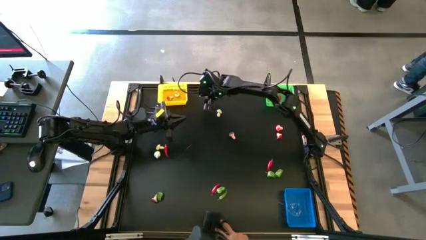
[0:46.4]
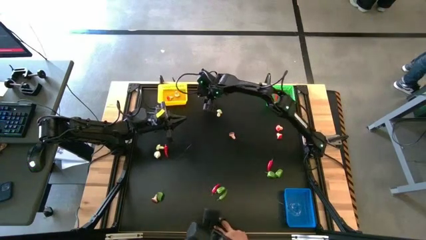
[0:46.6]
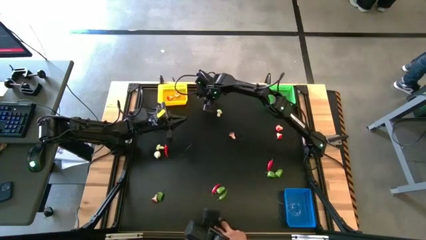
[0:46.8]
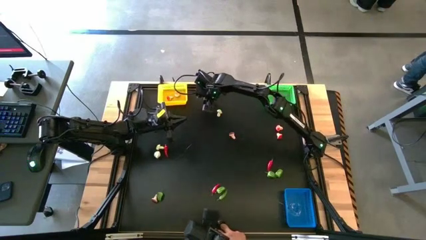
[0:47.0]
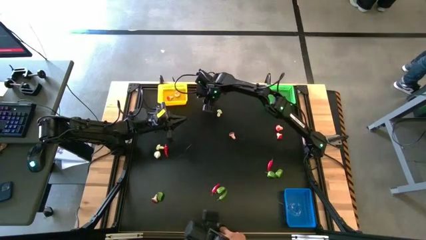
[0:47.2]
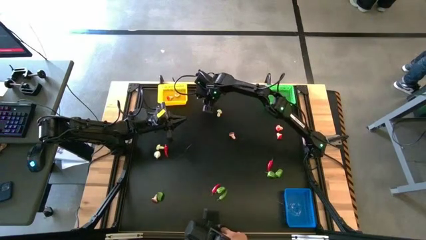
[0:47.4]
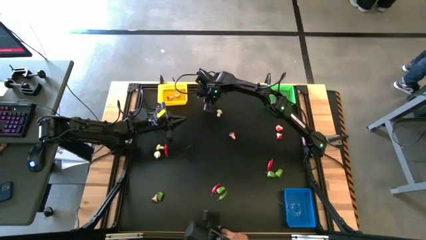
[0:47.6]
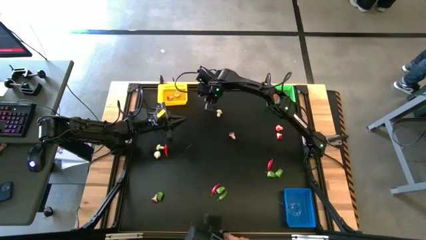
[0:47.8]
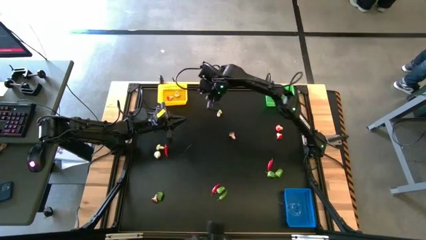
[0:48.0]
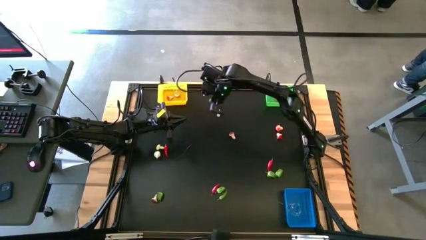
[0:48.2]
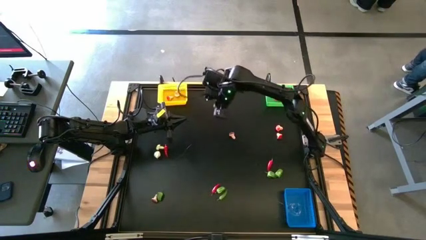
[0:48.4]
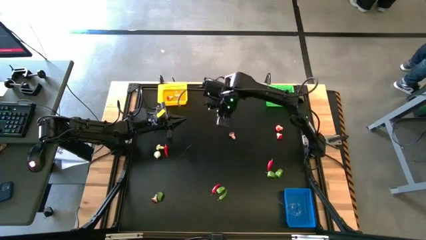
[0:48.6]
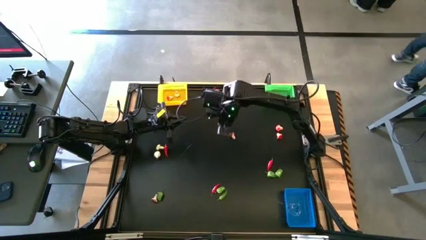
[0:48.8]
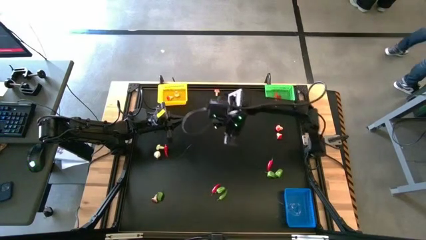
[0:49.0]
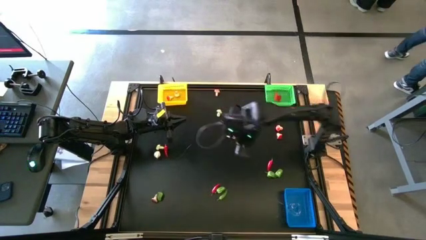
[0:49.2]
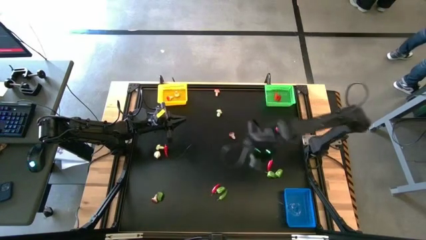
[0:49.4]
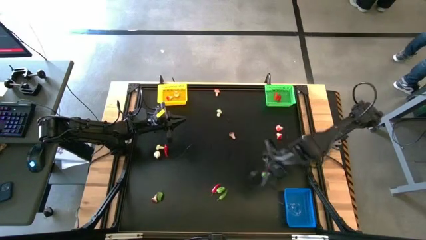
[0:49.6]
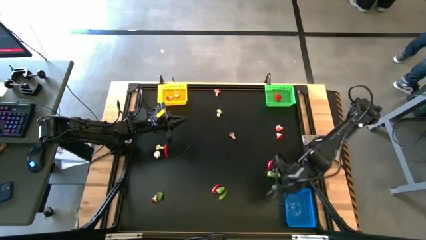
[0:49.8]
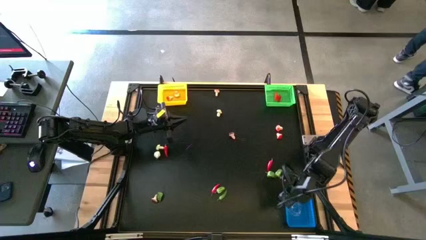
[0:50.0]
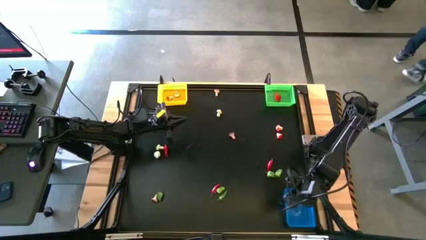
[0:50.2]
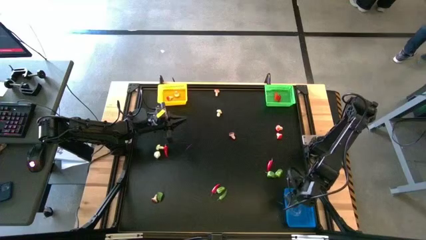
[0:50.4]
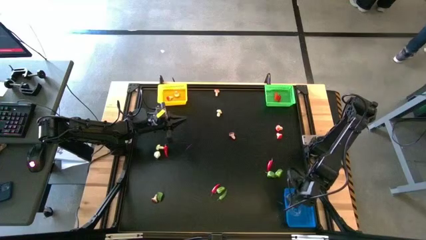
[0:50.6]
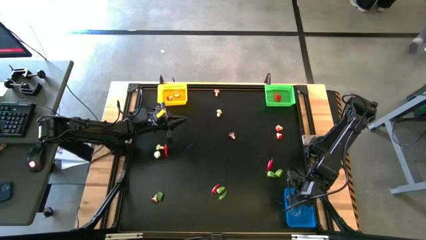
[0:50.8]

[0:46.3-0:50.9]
Task: Sort produce into baskets
Put the green bell pepper into the blue bin

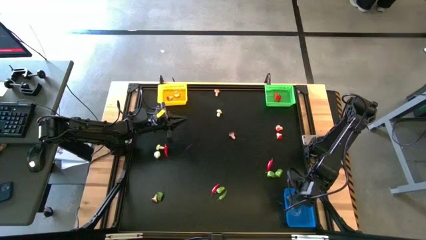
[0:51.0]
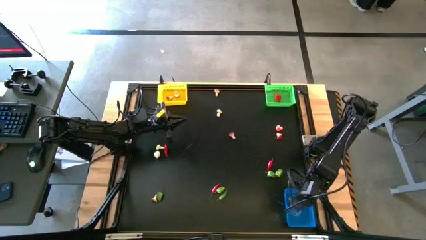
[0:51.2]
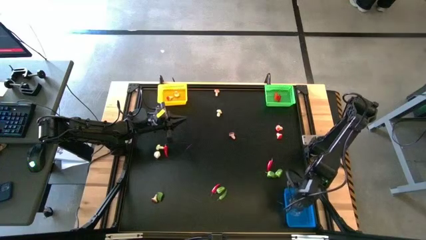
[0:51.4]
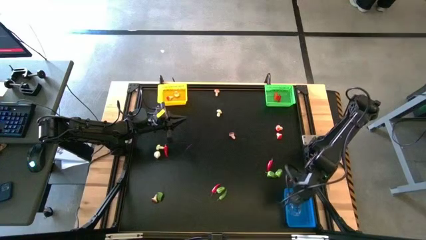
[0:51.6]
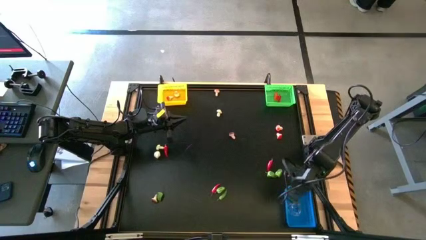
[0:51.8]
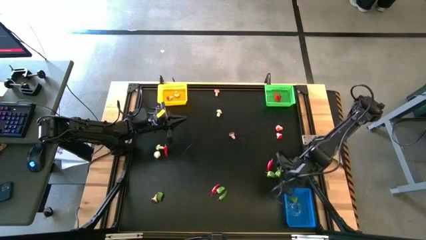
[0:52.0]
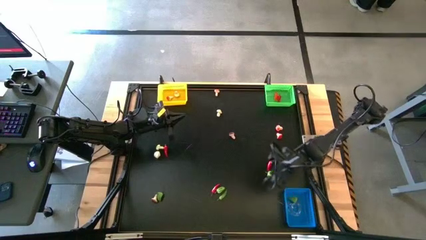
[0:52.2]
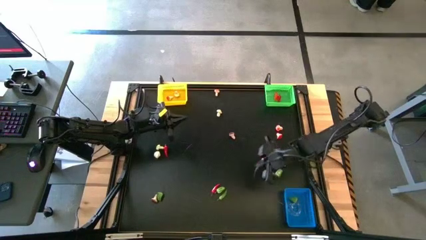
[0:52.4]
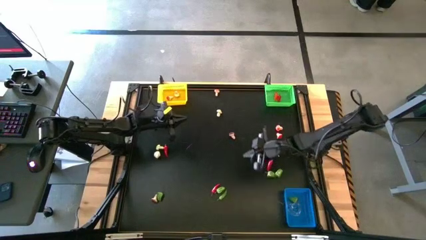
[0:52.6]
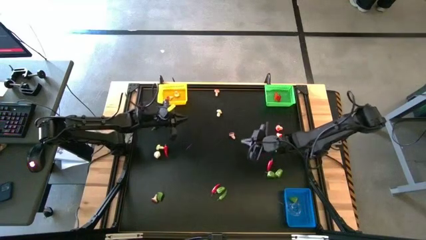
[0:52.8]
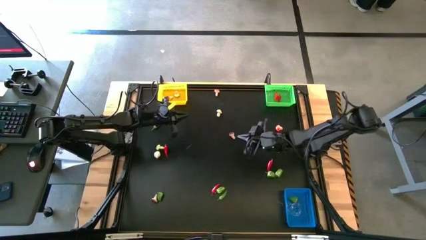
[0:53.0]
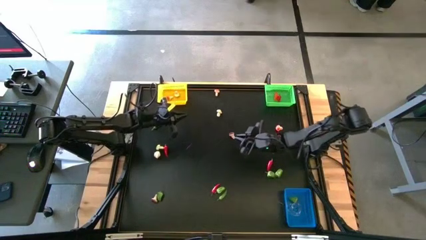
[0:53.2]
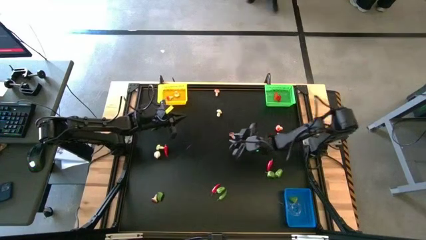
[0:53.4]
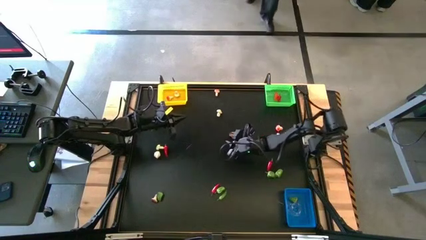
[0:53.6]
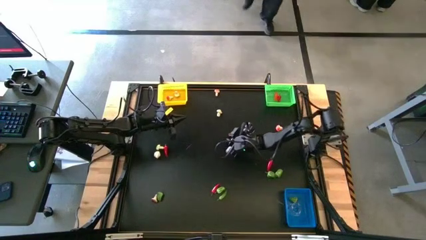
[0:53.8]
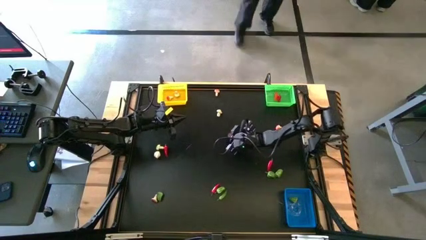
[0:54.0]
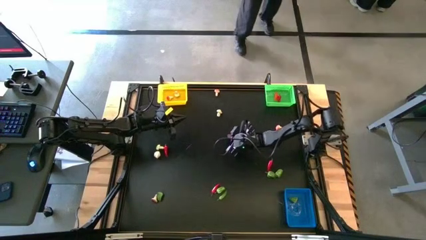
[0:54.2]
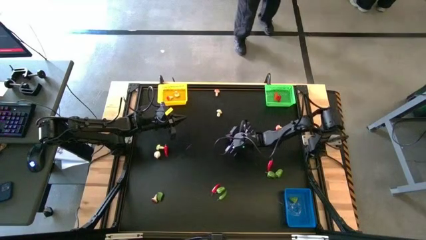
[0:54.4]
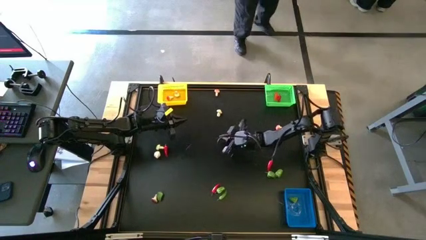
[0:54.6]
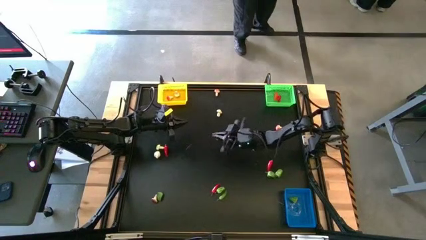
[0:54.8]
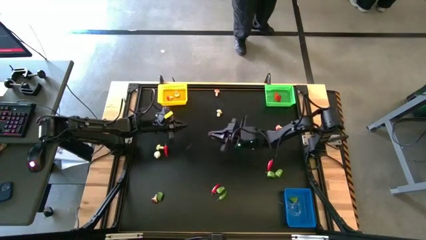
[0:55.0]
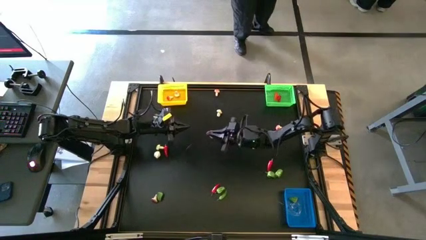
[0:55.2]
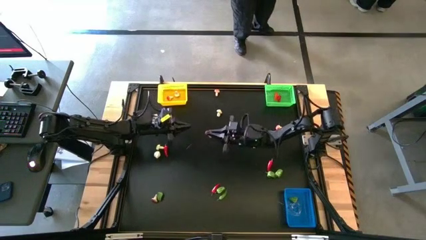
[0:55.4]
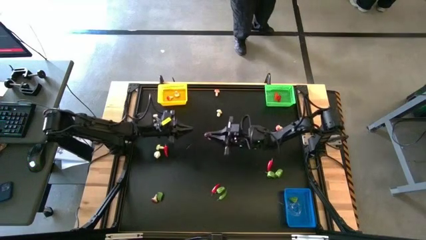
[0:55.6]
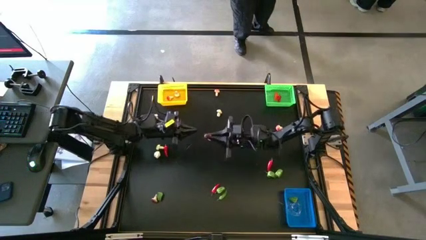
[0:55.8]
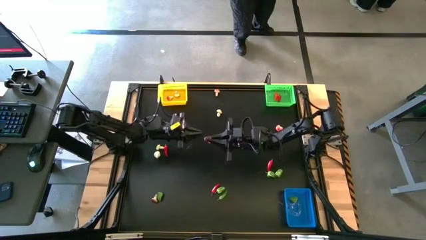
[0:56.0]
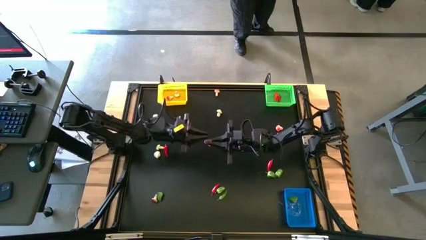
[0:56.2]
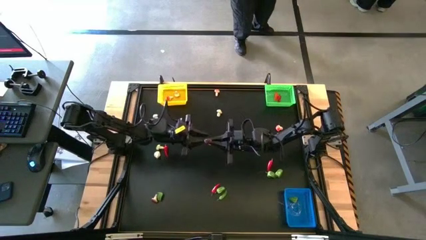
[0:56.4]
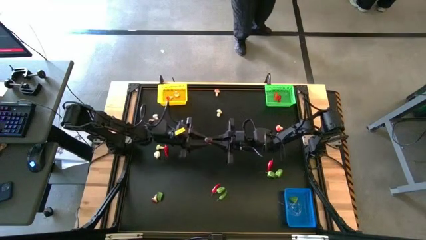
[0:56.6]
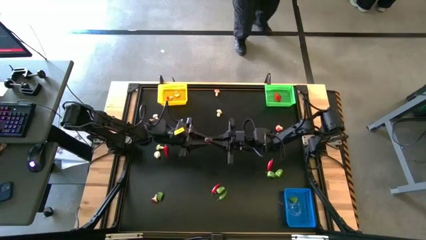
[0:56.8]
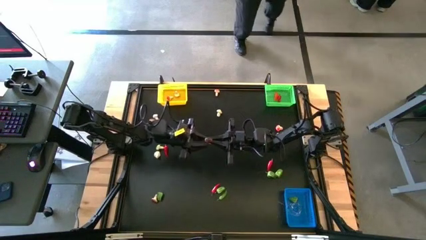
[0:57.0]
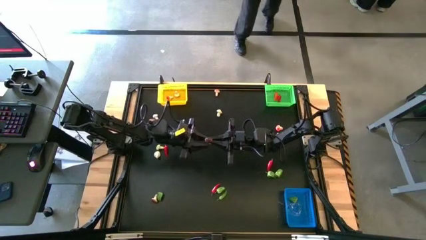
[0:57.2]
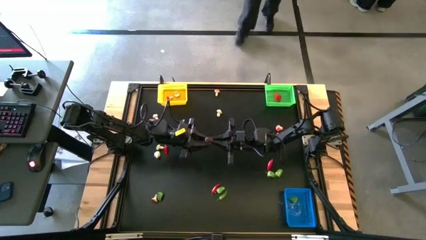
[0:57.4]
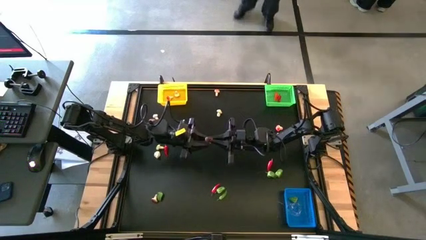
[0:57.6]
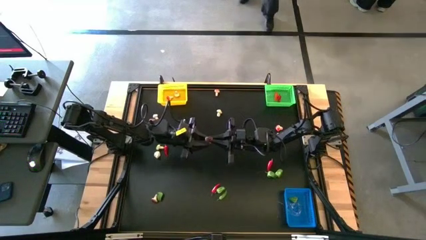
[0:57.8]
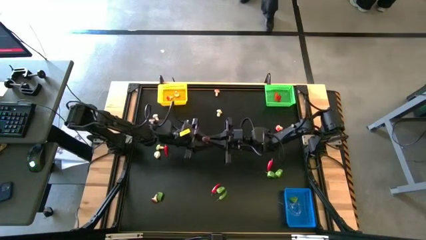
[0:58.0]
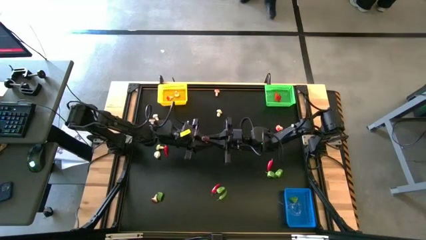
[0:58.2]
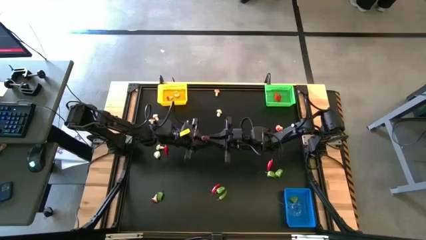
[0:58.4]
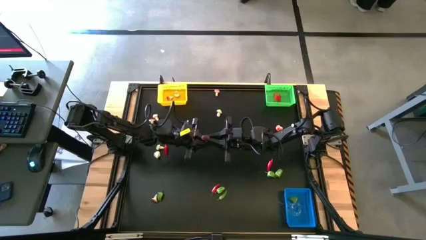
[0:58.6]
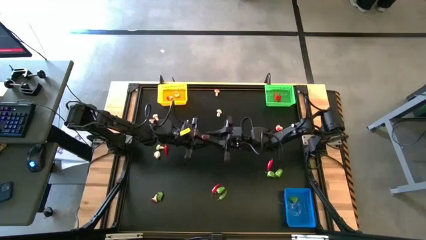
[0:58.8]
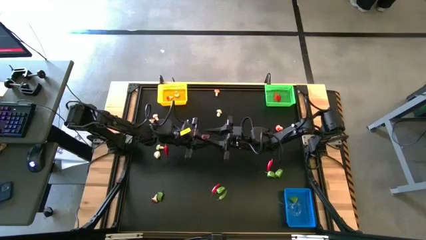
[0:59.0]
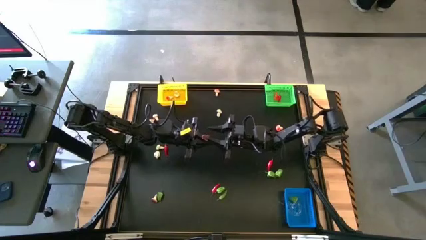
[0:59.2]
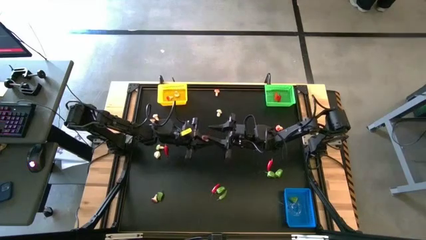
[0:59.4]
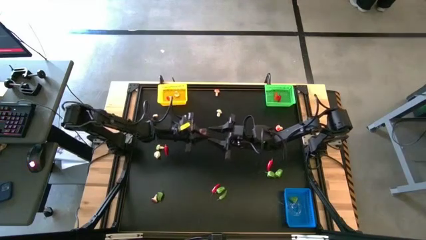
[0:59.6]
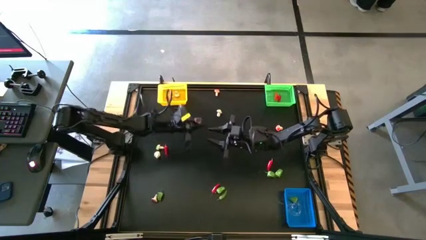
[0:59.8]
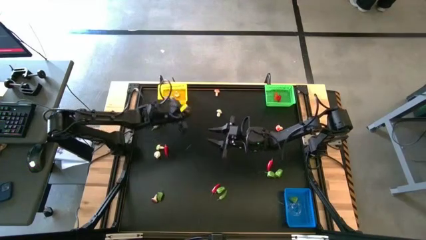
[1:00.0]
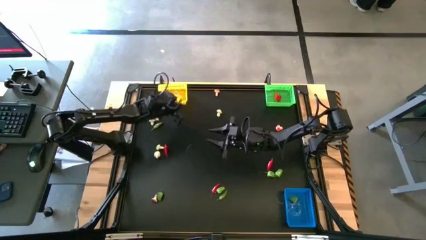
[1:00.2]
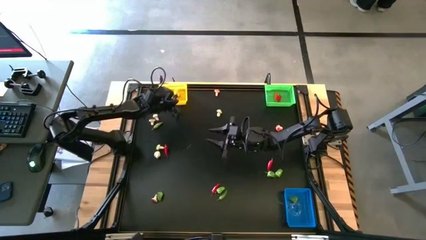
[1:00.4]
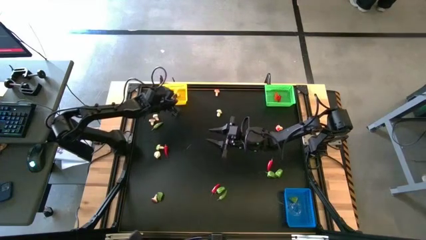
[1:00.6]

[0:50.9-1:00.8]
Put the brown mushroom into the yellow bin
